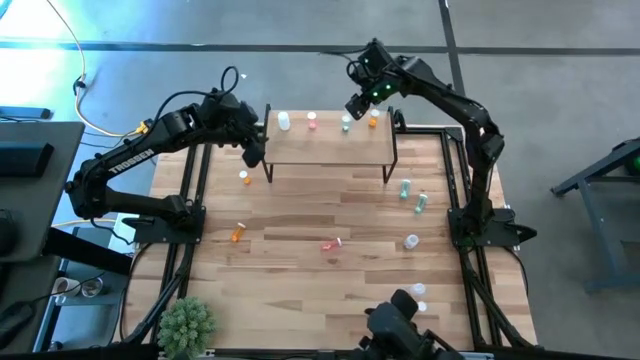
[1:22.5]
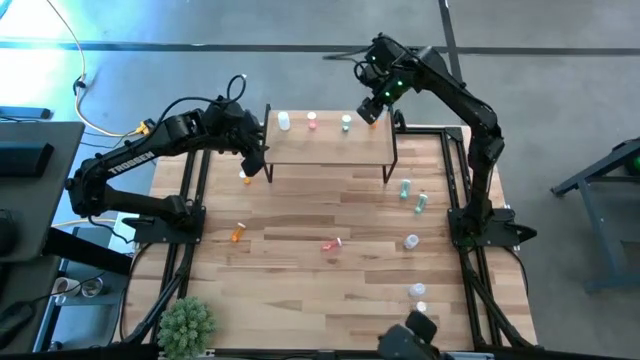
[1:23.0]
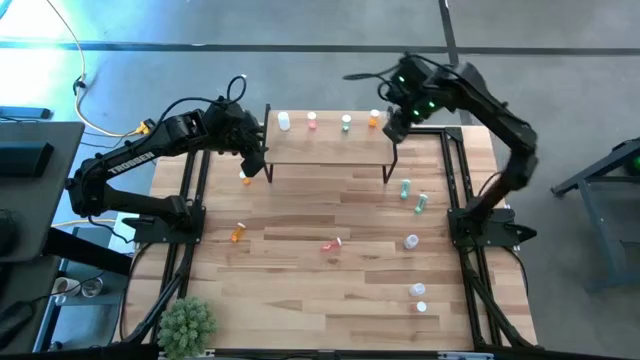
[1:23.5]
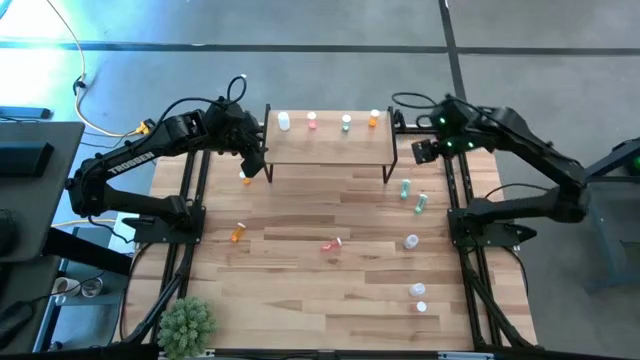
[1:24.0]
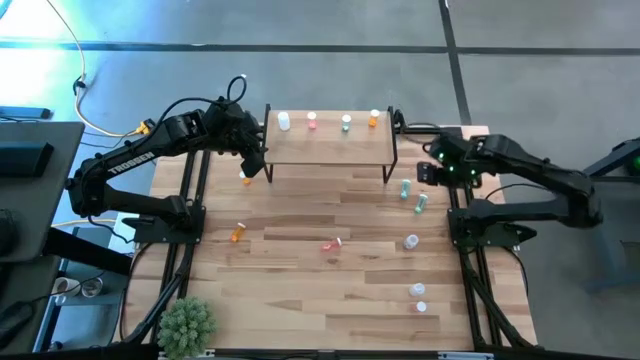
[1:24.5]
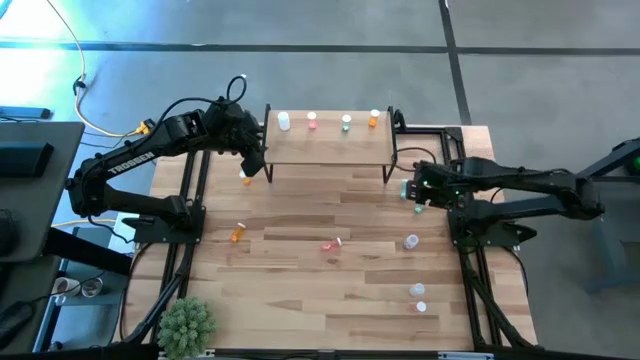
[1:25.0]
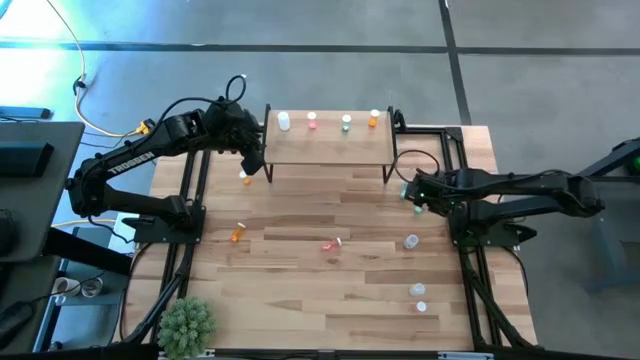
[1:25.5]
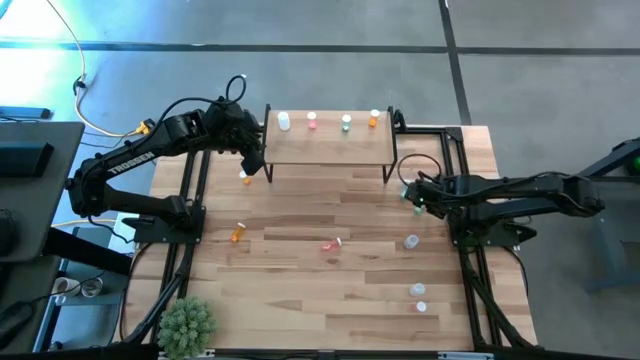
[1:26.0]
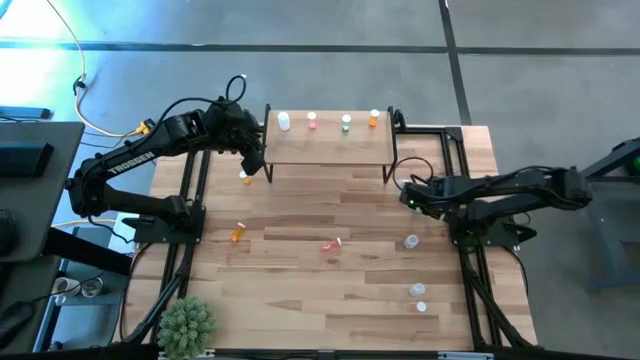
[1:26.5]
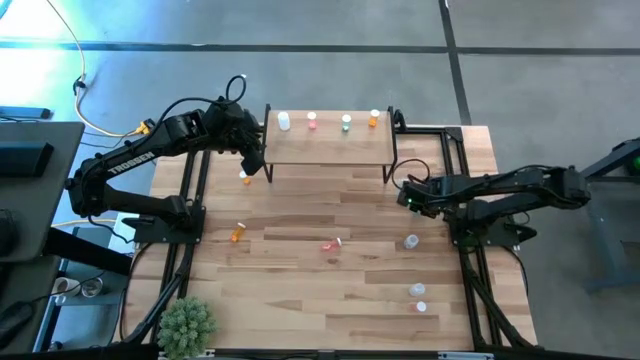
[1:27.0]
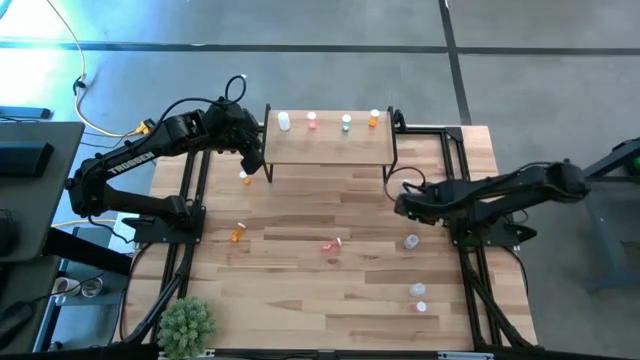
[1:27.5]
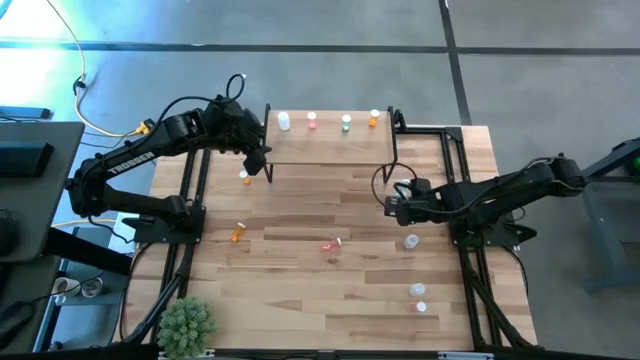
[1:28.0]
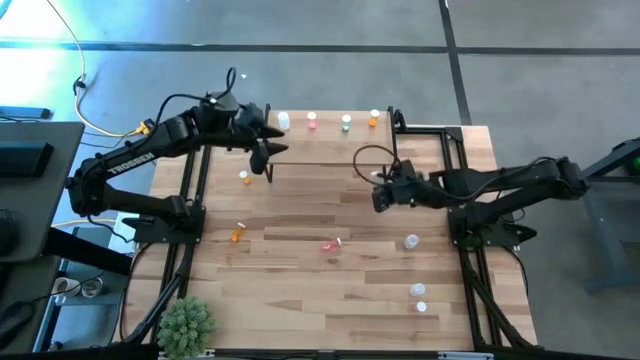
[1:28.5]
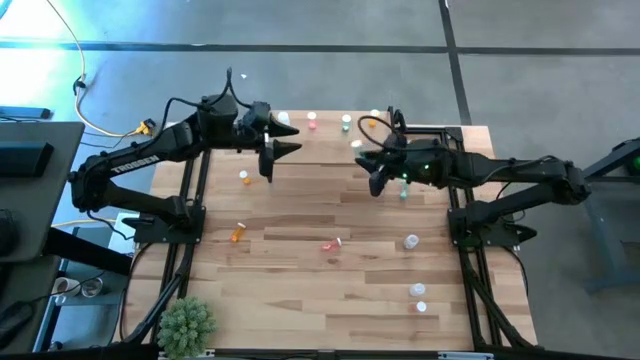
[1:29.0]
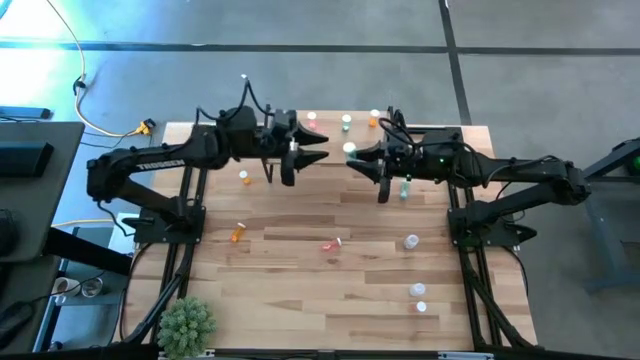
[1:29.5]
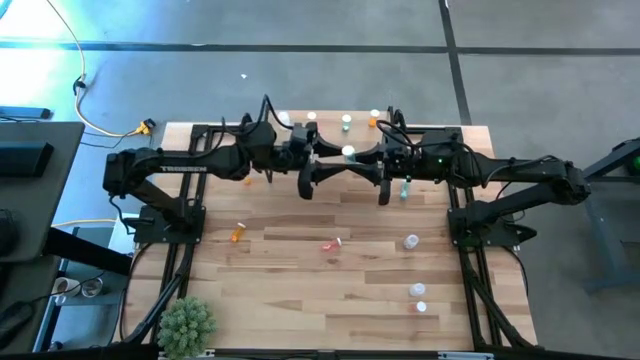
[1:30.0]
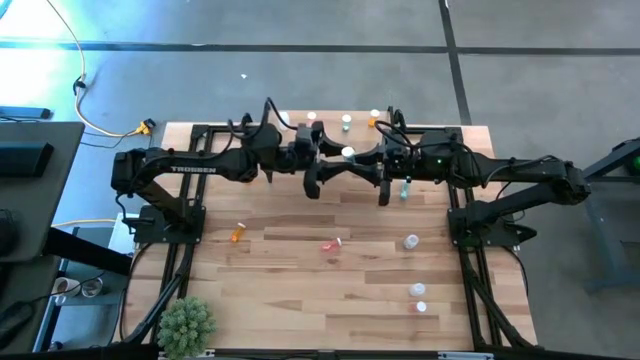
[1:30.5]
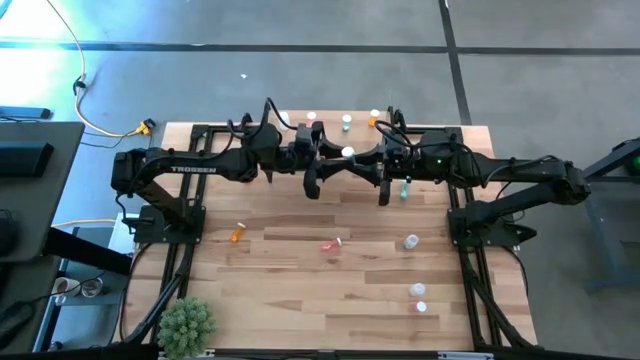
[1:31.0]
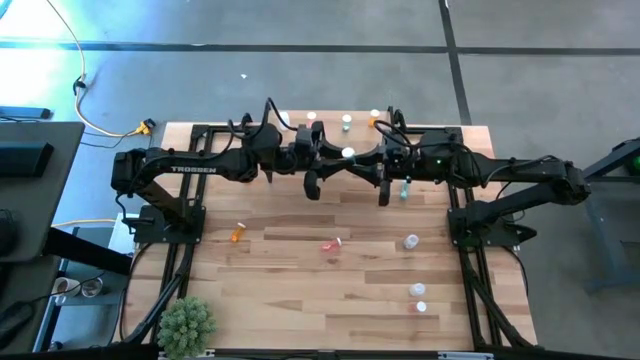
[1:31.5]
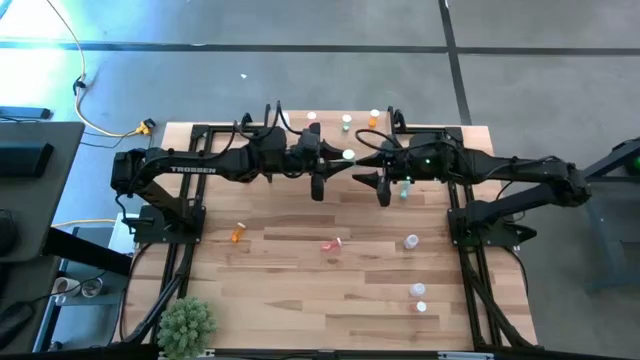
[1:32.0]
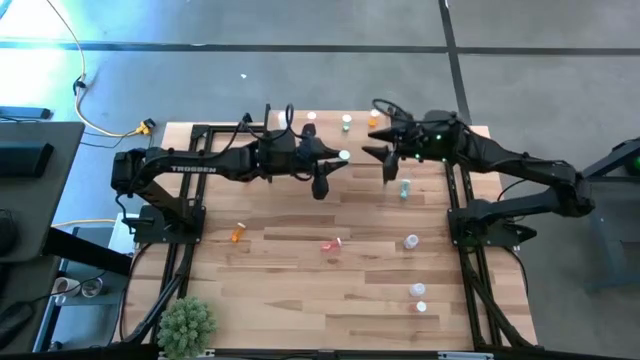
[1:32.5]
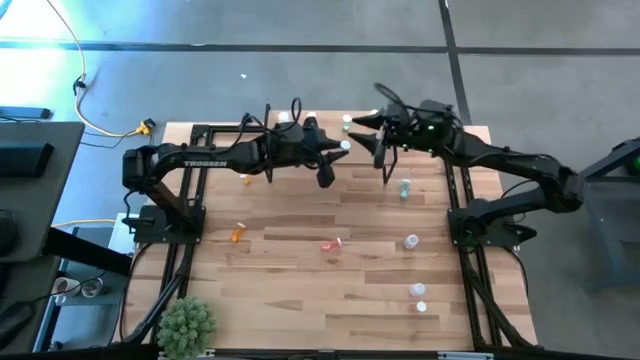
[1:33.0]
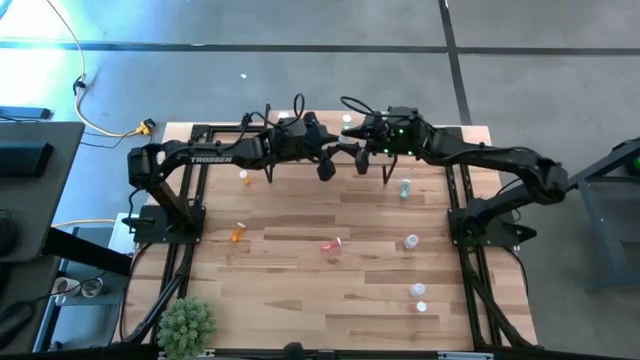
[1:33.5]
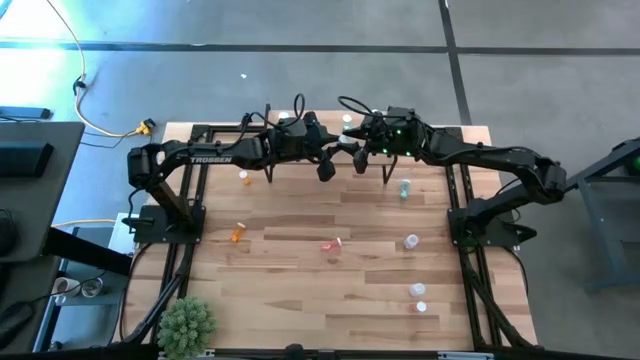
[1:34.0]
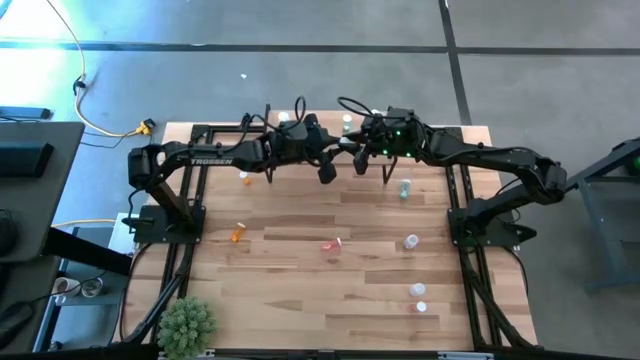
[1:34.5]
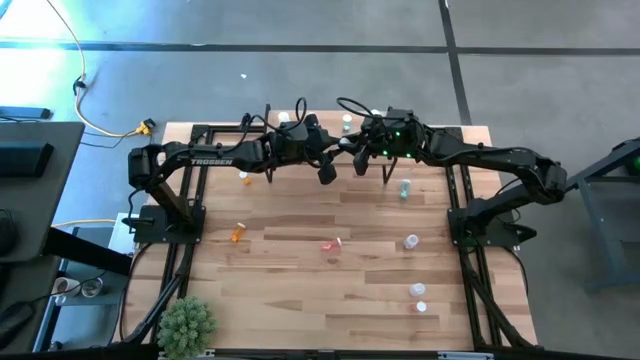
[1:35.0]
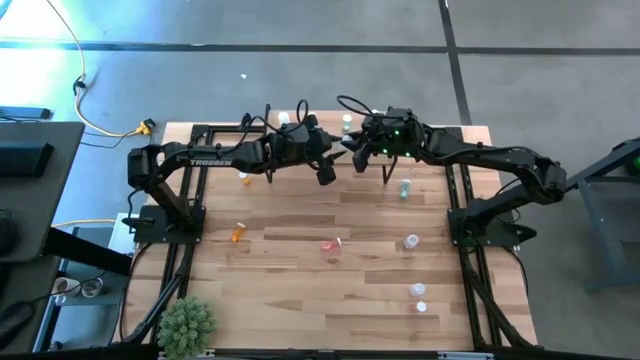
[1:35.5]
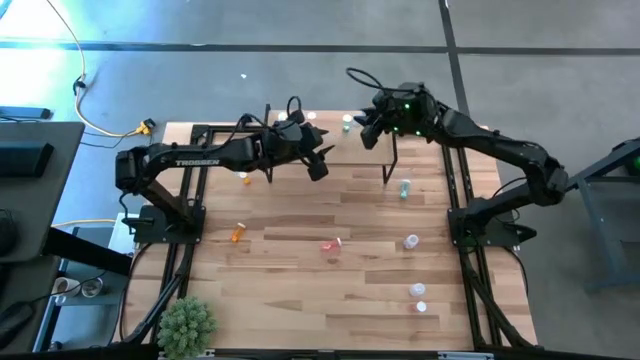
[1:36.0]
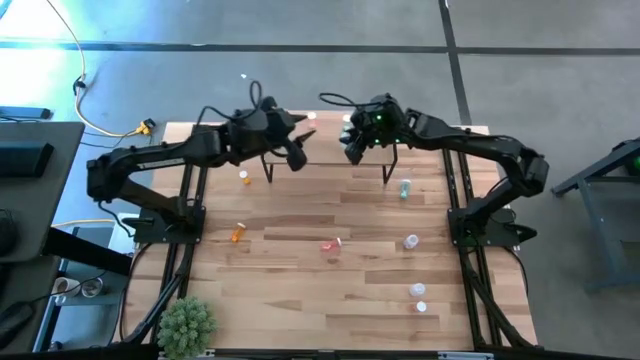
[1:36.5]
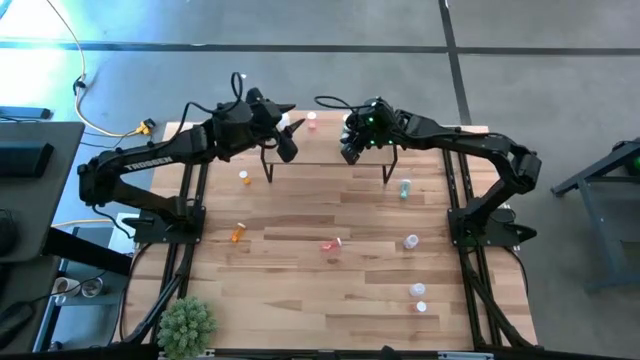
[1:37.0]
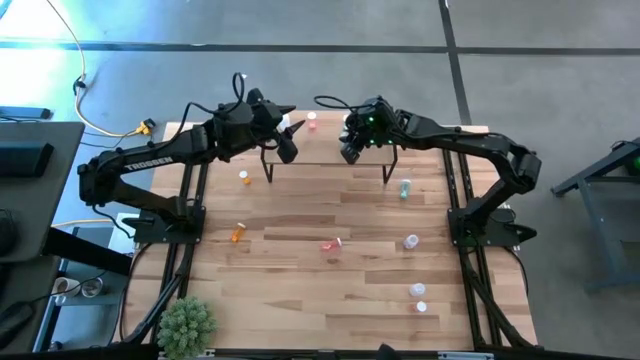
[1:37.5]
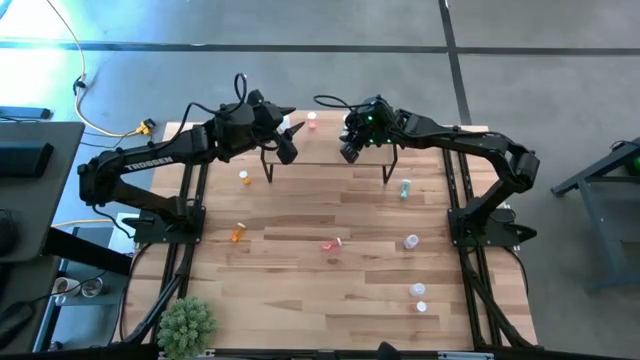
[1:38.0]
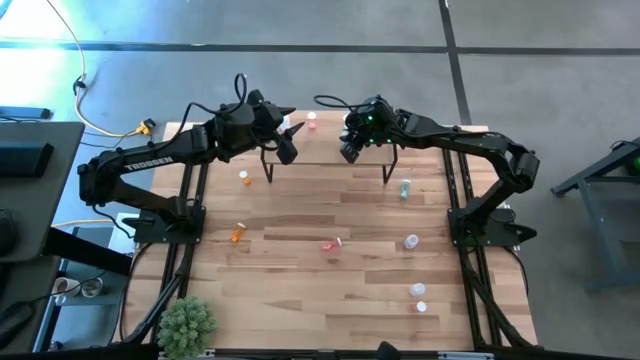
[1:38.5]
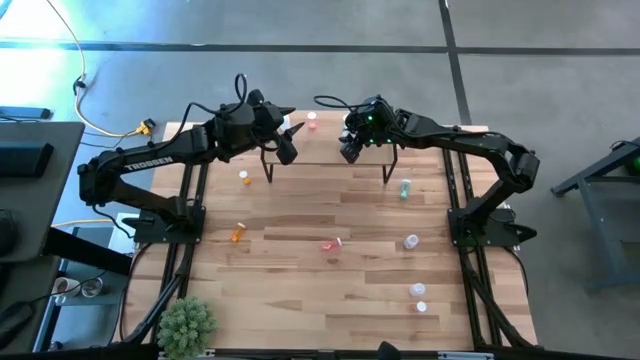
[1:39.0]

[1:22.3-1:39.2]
Task: Pick and place medicine bottles onto shelf by color
Put the right blue pill bottle on the shelf aligned with the other blue pill bottle

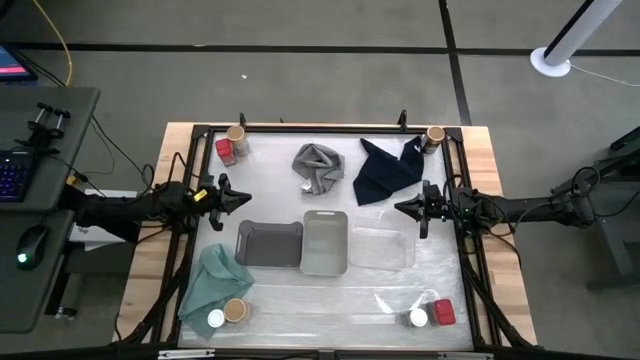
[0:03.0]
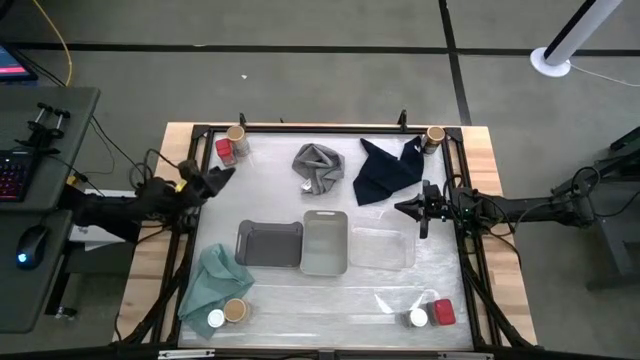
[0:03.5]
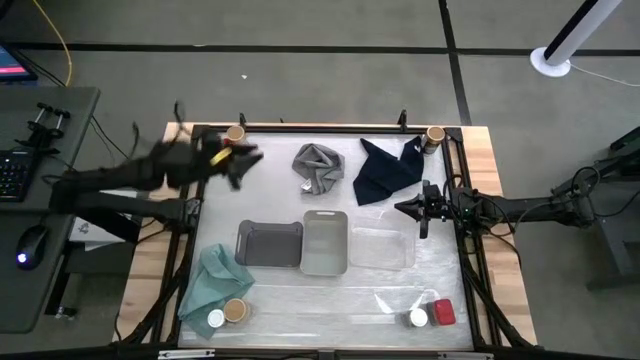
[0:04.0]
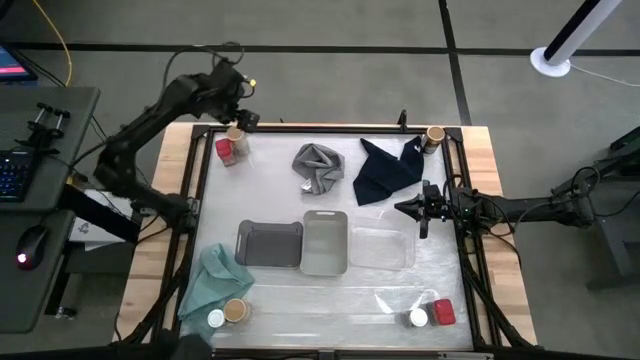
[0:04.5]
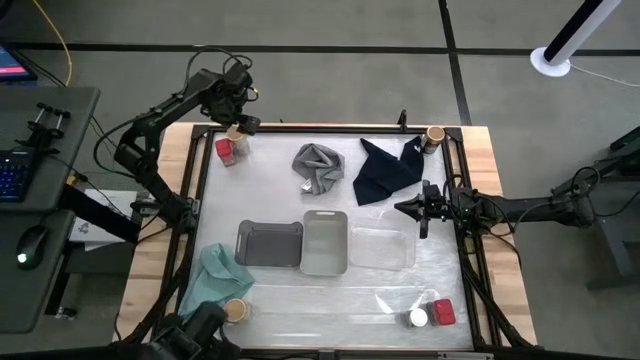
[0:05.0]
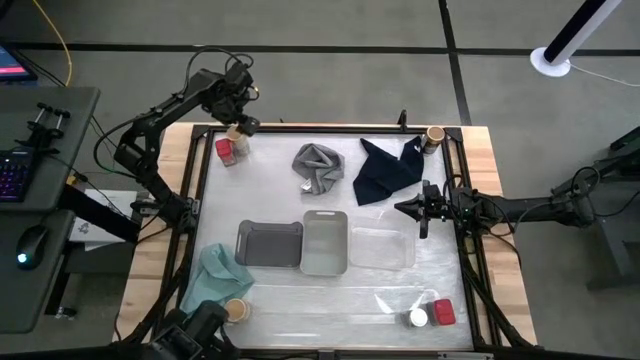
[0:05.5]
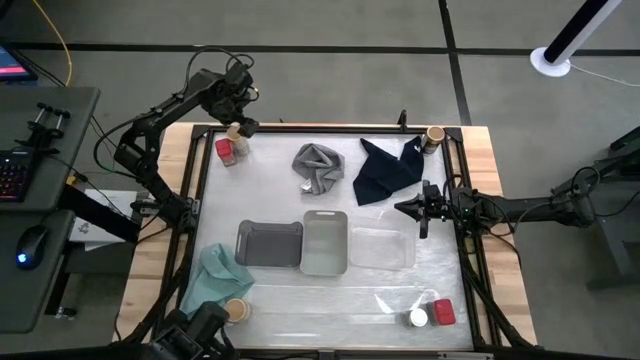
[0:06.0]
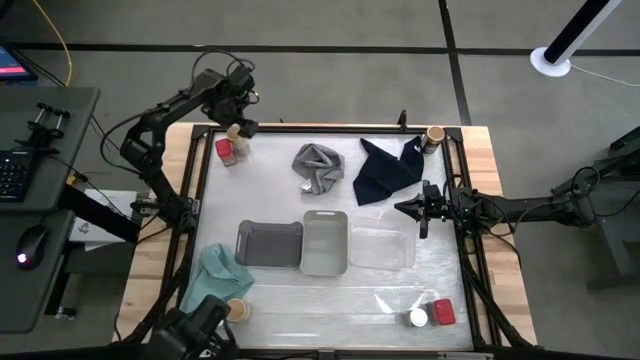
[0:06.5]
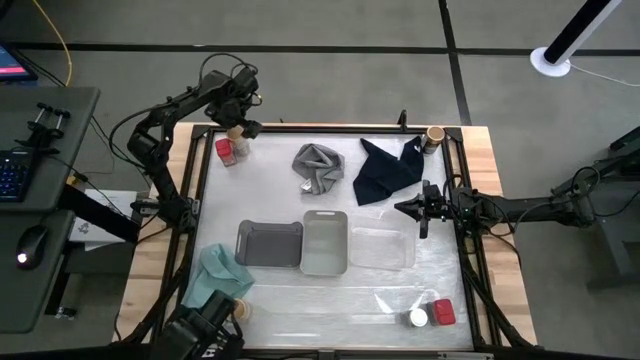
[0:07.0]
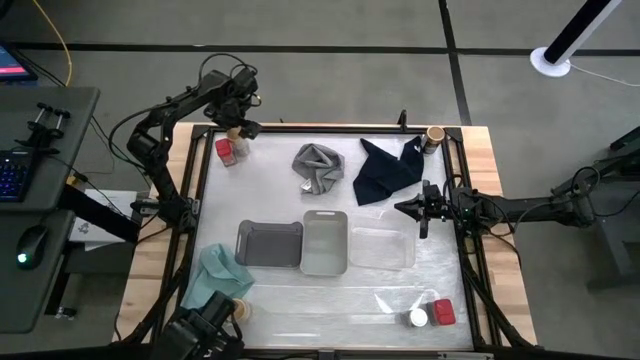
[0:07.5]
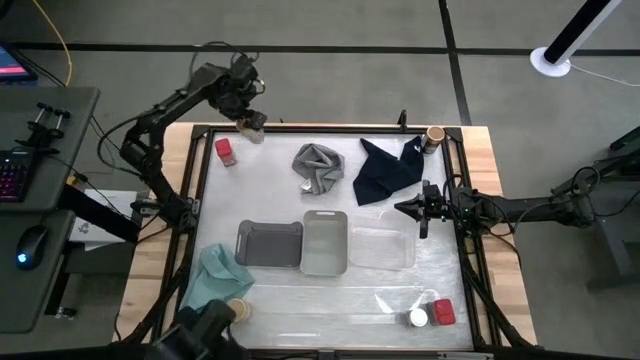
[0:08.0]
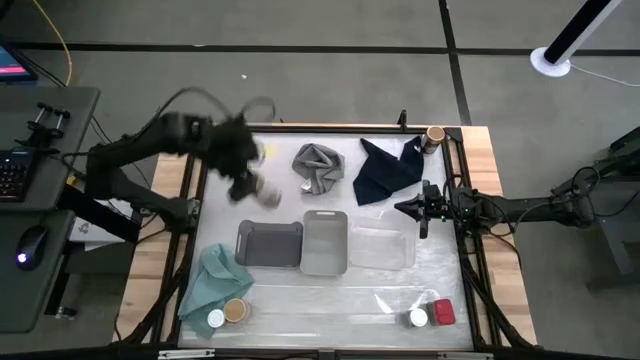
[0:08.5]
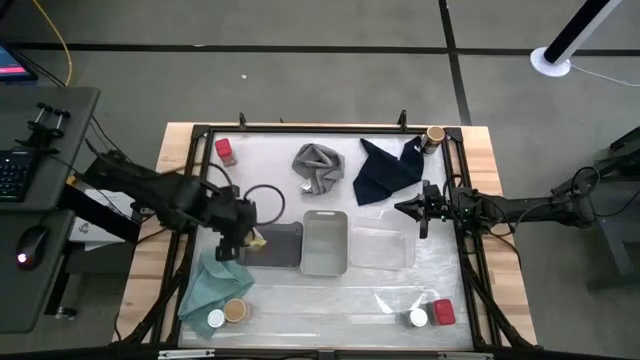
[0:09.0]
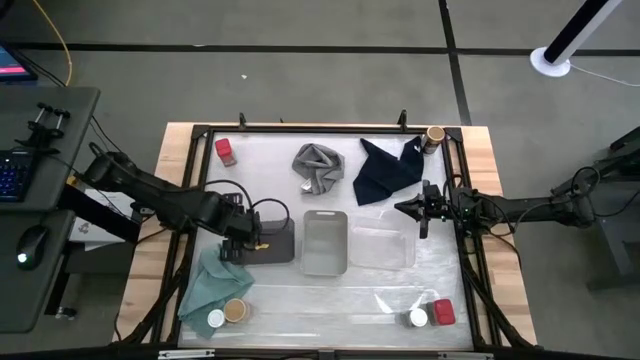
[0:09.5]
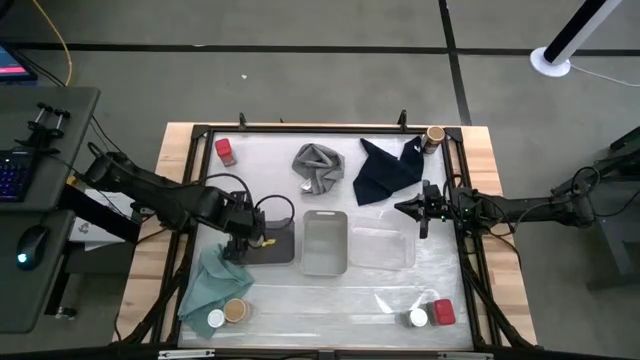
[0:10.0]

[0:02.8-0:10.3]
Task: Sort spices by type
Put the top left gold seasoning bottle into the black bin
